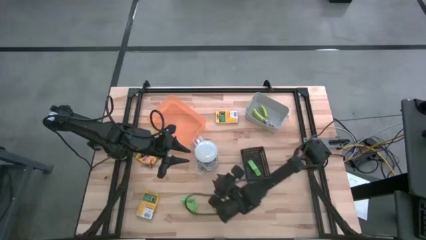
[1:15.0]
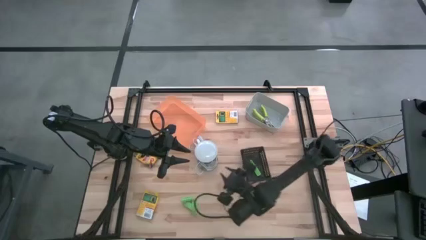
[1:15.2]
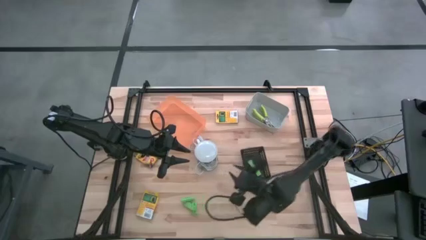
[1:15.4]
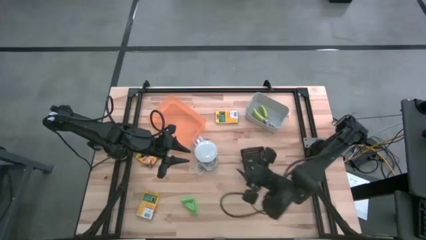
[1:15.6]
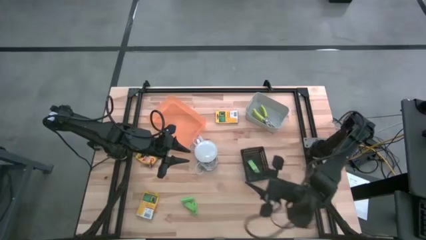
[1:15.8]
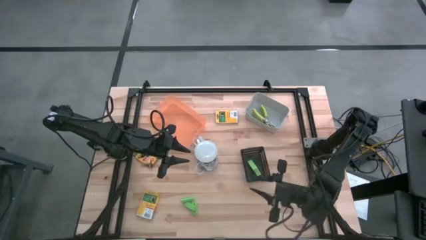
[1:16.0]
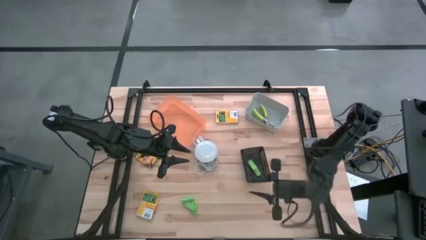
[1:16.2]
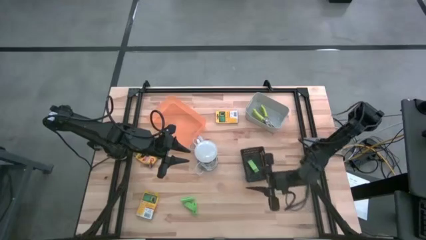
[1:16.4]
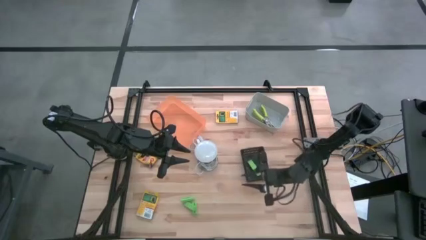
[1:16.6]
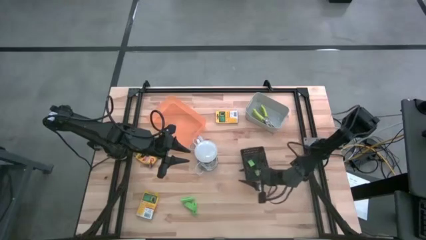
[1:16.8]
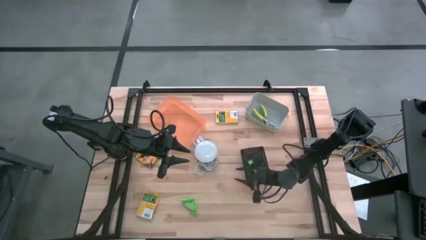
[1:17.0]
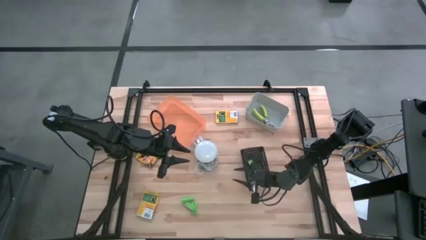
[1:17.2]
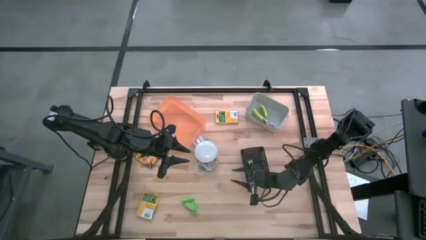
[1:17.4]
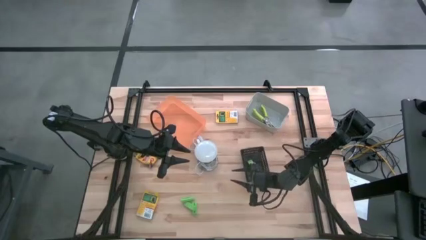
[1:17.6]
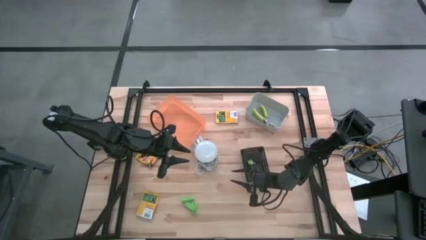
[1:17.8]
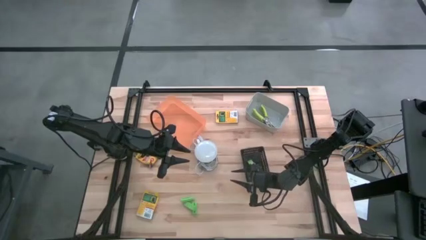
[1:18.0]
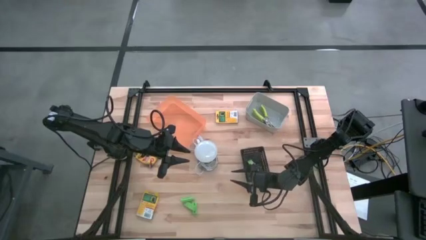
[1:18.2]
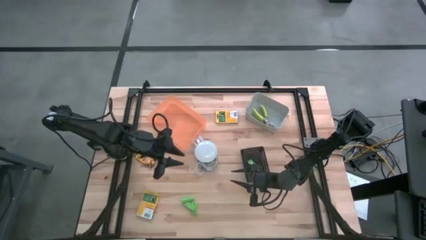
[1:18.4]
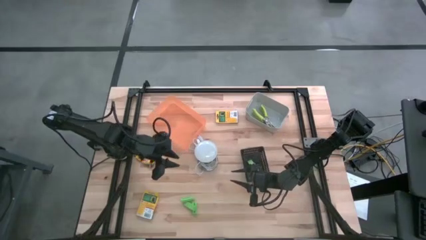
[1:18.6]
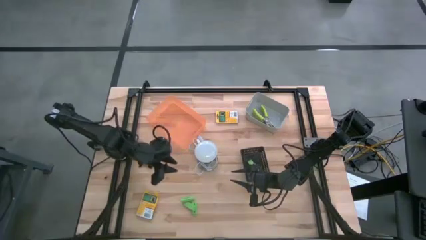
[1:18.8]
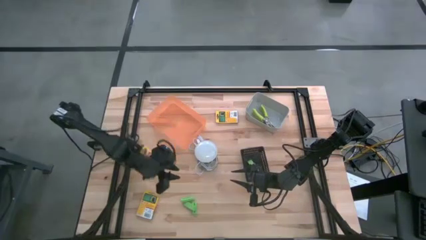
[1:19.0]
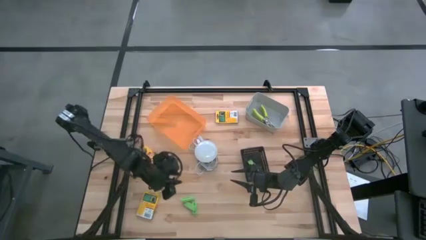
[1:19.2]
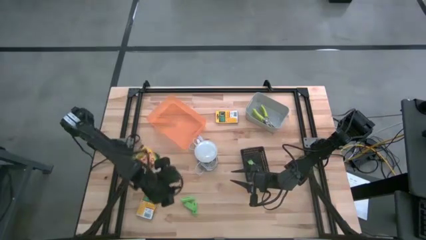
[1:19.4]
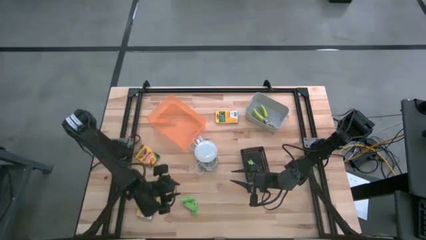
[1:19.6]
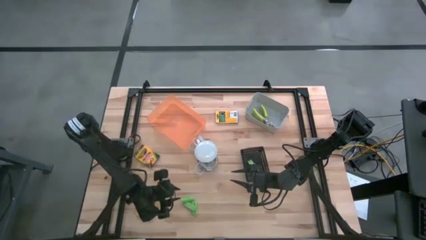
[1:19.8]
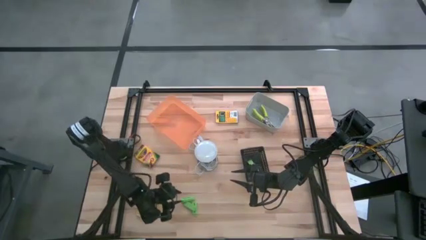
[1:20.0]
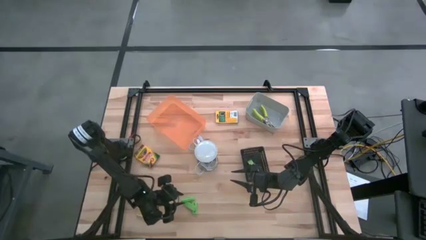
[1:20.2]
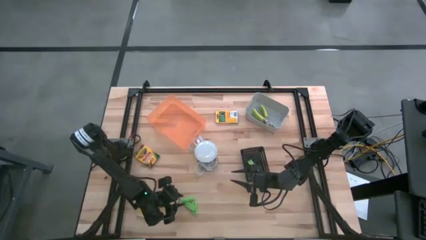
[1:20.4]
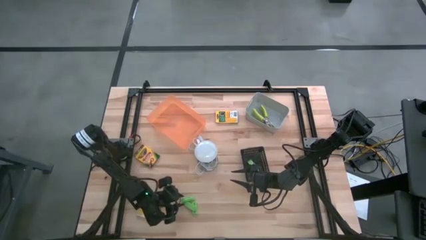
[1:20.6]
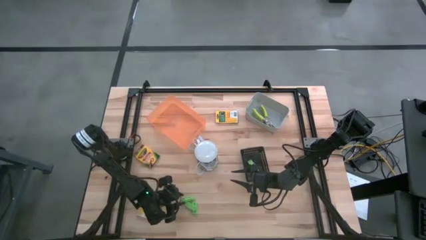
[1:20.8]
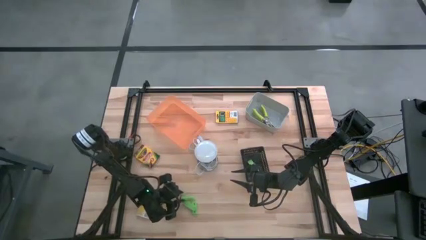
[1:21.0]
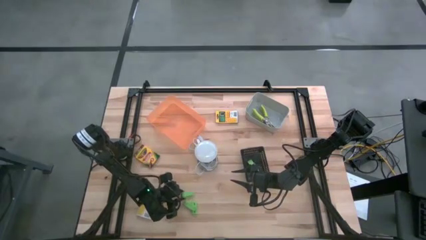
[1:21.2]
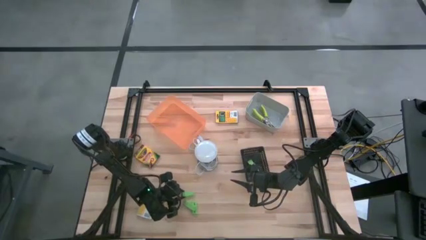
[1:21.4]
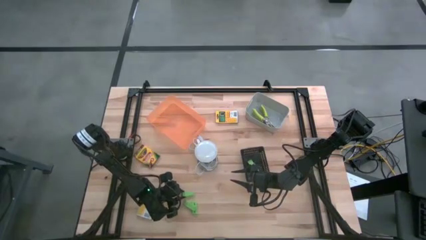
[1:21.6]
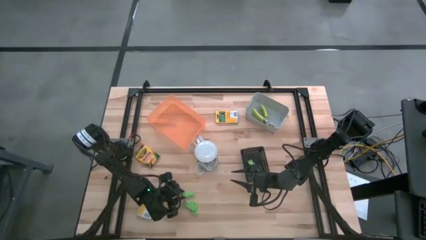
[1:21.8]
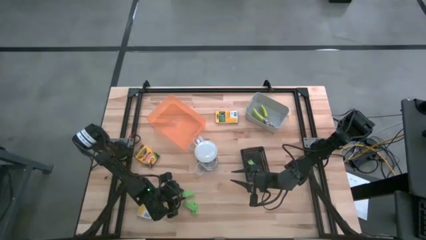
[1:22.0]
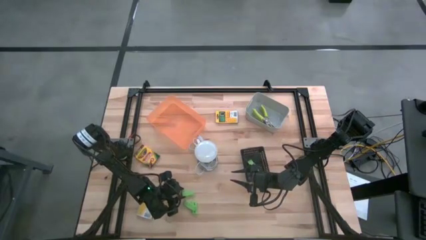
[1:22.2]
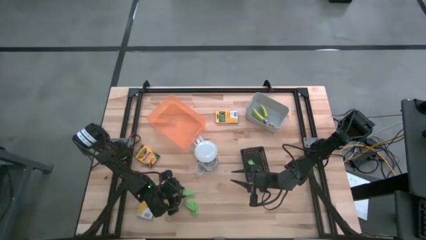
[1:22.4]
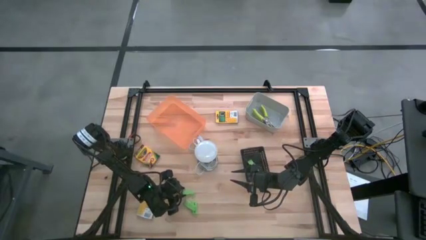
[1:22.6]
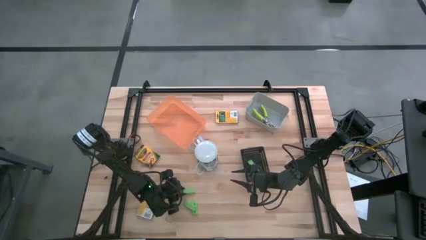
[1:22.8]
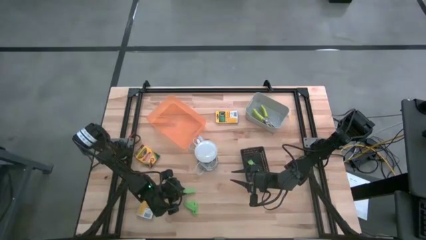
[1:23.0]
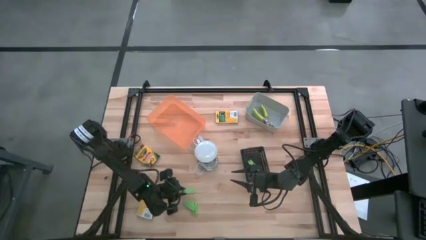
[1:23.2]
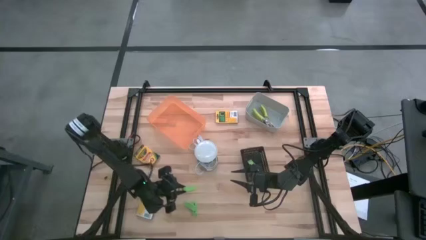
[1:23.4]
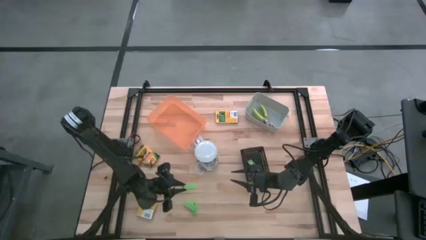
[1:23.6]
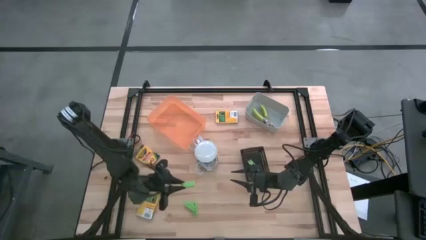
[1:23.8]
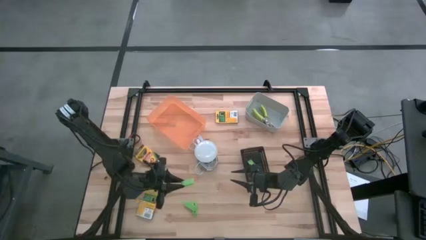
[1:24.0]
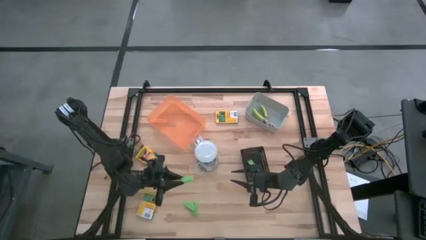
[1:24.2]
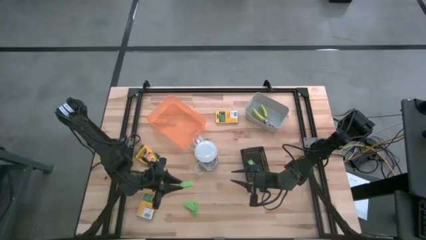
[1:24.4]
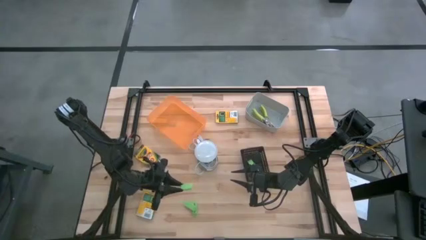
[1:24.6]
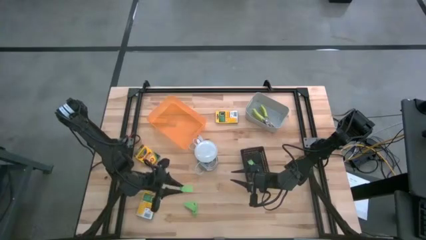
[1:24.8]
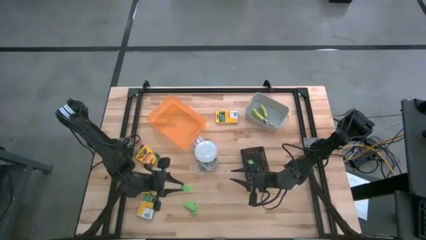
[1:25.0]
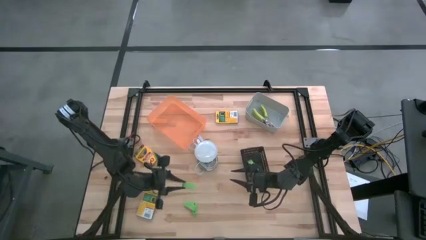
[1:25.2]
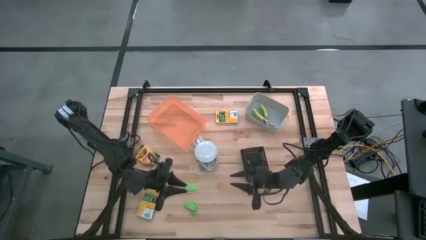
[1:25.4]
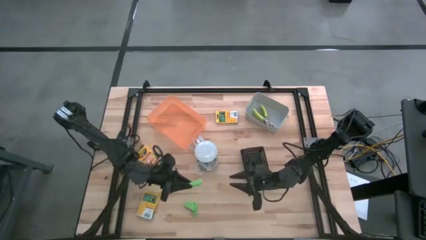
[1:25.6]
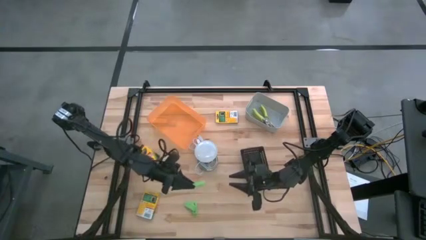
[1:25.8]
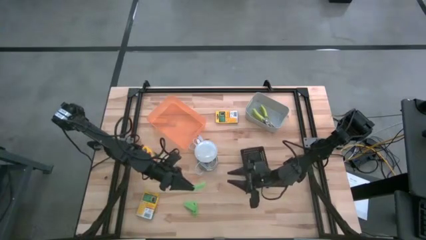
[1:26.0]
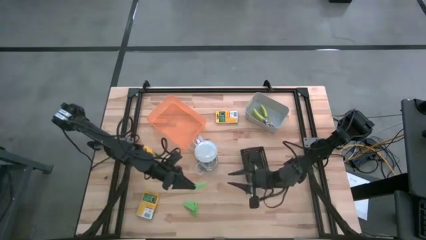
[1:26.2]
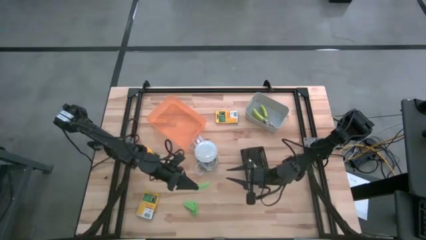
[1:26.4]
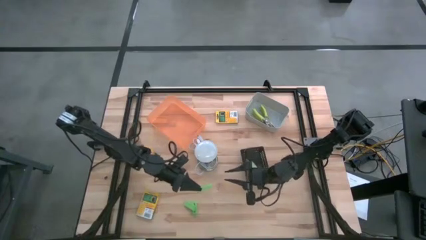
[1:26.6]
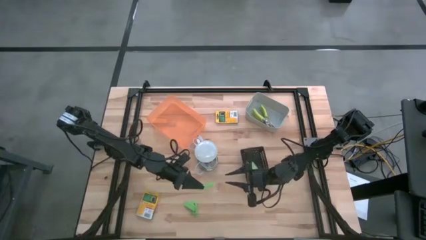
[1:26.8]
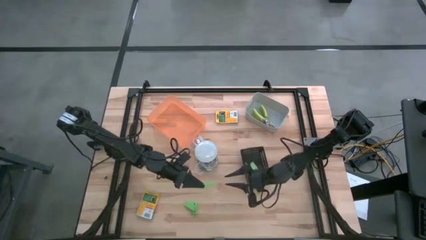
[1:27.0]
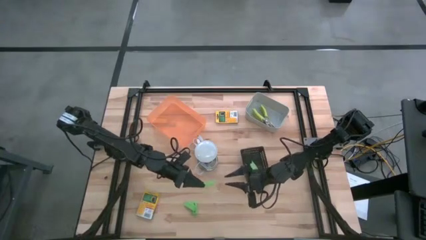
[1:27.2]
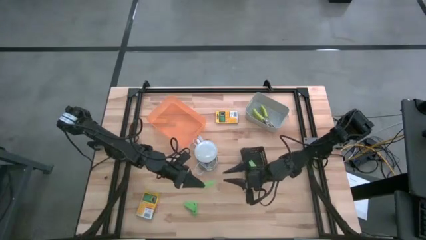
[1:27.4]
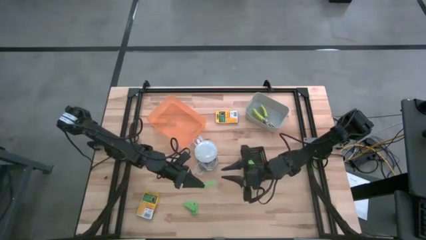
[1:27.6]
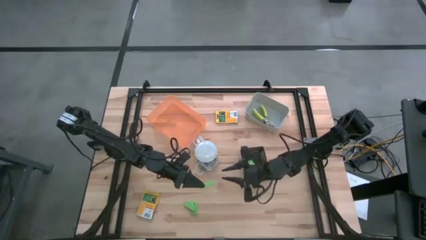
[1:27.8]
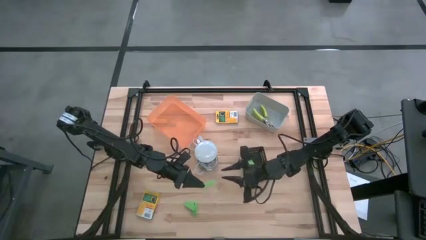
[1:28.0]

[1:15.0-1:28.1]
Task: Pick & Place School Supplies
Put the green eraser into the black bin

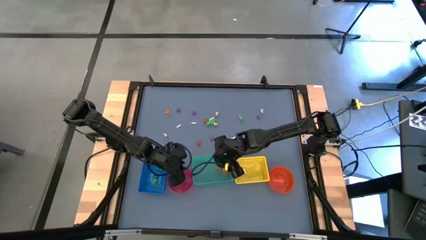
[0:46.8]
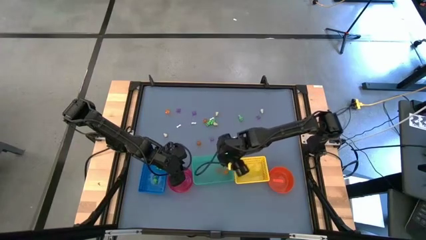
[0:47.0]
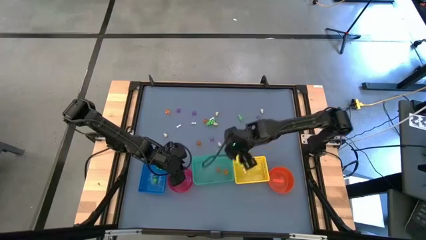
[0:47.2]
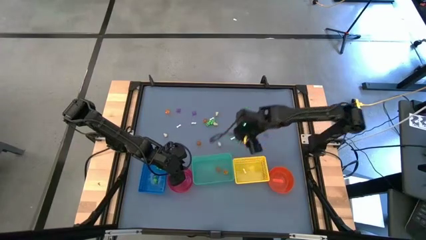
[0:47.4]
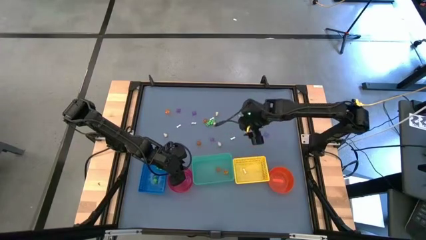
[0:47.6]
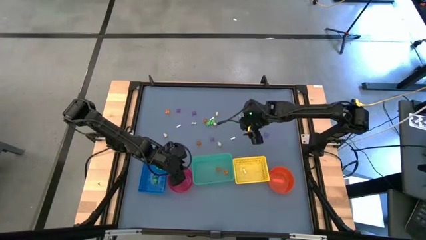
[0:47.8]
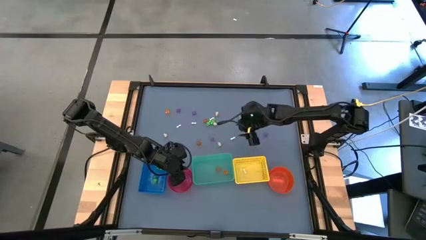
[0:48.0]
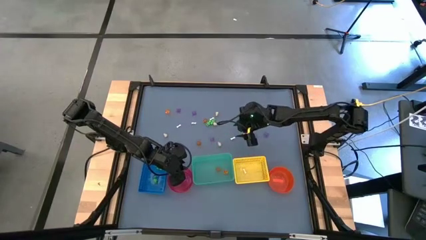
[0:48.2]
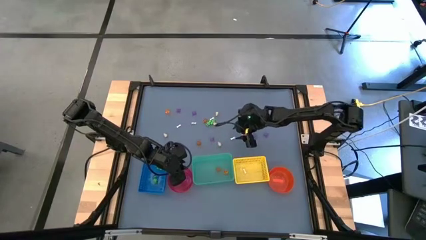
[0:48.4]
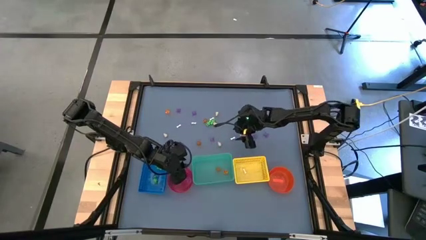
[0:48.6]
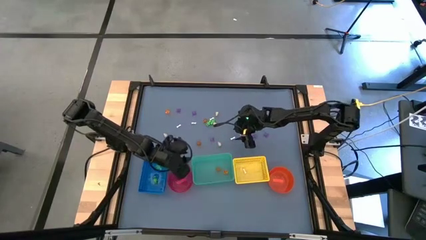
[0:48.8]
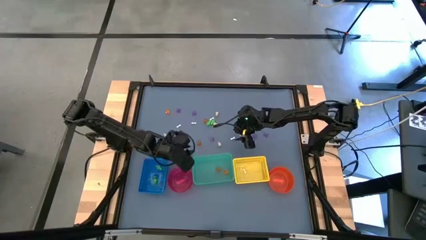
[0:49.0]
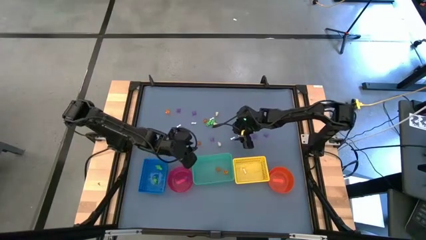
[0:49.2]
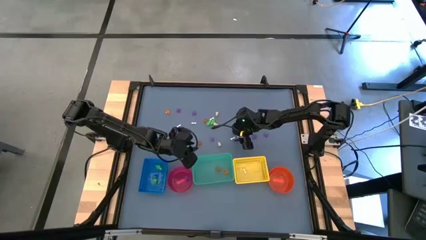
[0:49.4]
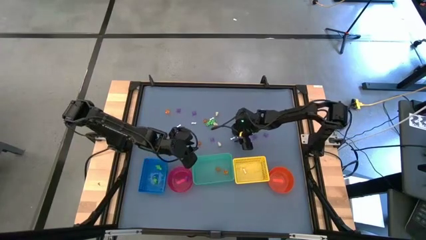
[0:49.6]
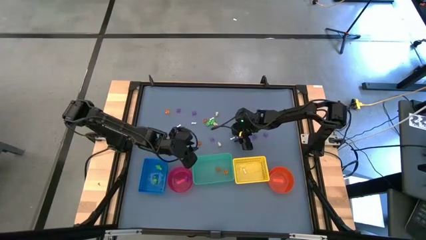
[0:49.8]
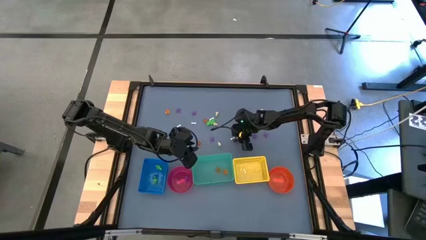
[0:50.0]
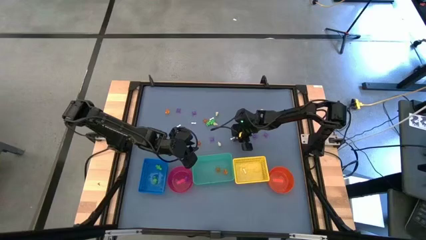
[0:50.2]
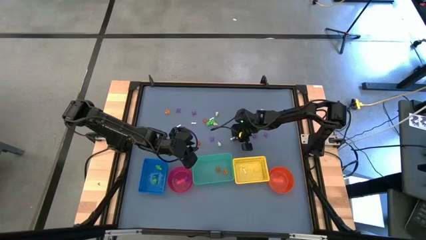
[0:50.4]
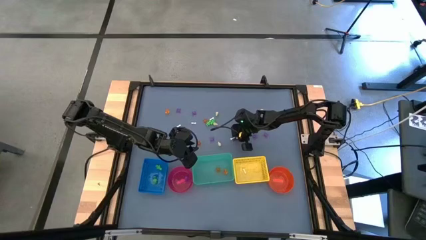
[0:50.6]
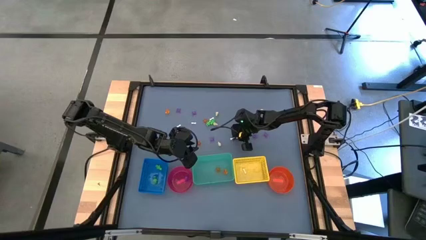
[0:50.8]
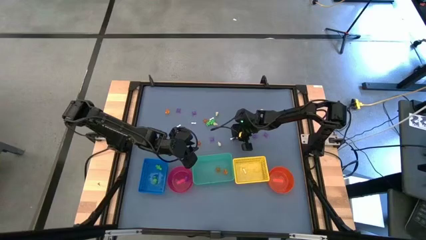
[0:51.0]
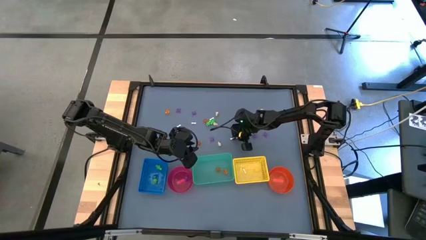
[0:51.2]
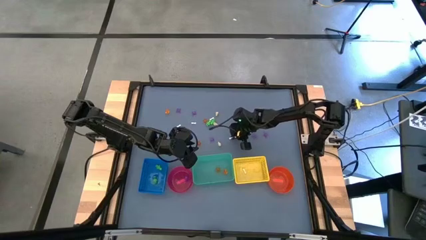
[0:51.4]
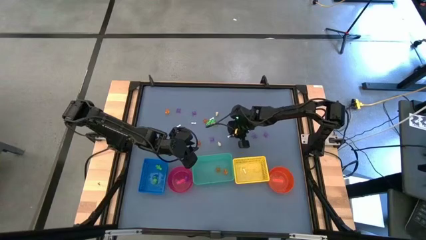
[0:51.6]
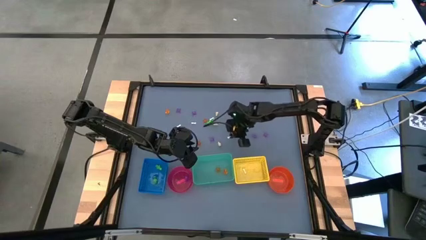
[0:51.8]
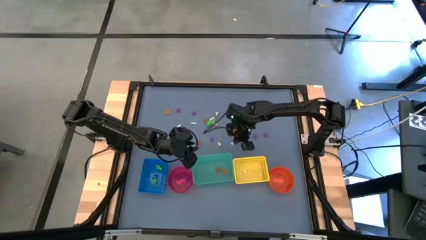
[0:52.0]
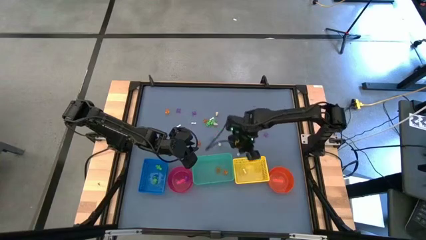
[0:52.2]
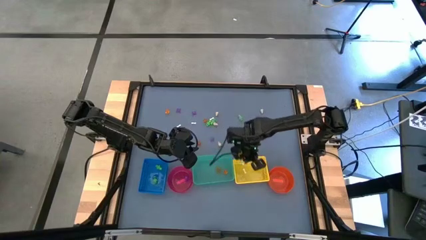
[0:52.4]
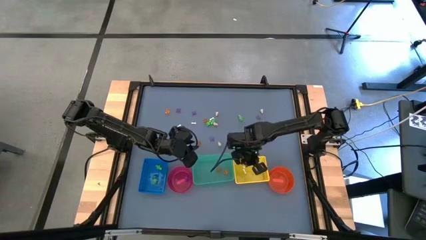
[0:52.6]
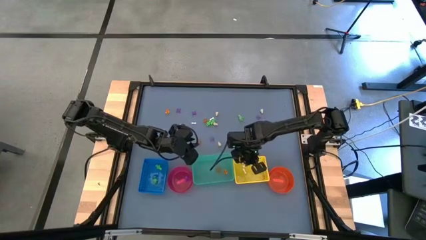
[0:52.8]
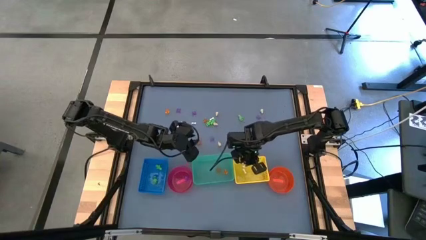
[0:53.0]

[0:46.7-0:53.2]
Task: Sort Halloween decoration
Put the white bone toy into the yellow bin
